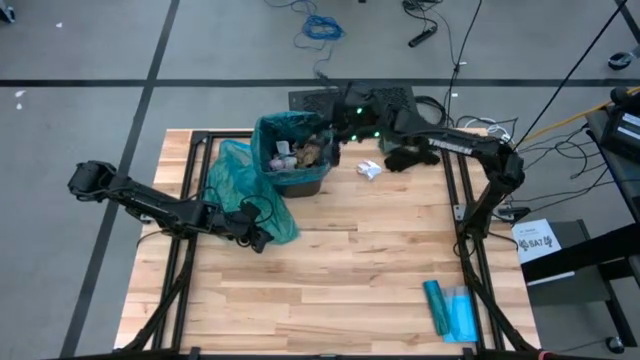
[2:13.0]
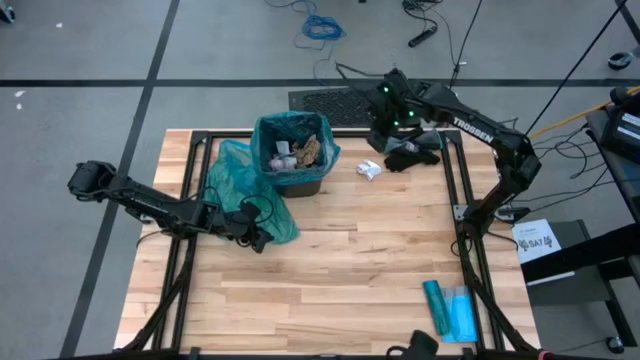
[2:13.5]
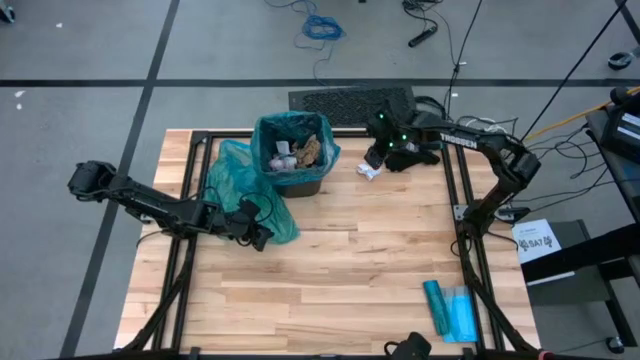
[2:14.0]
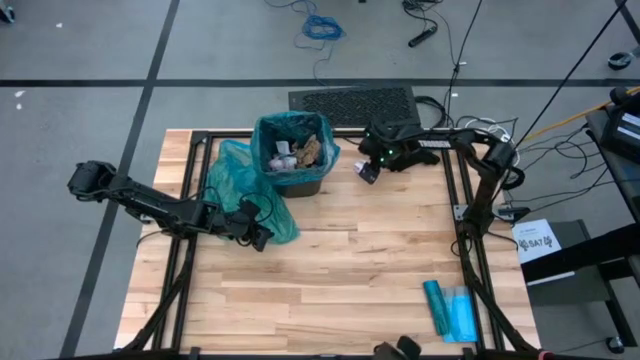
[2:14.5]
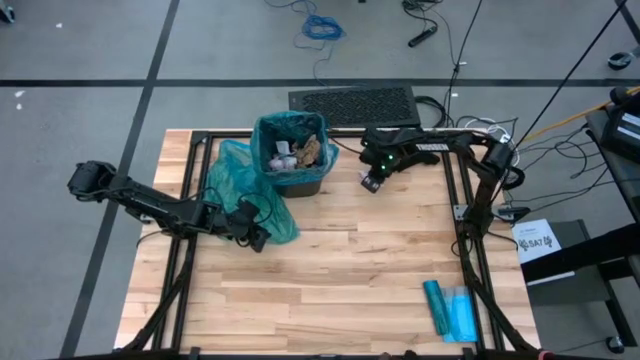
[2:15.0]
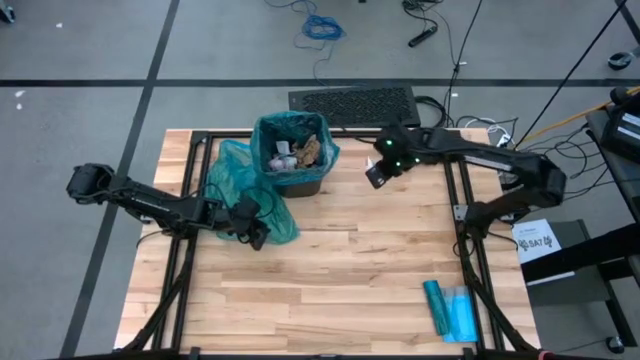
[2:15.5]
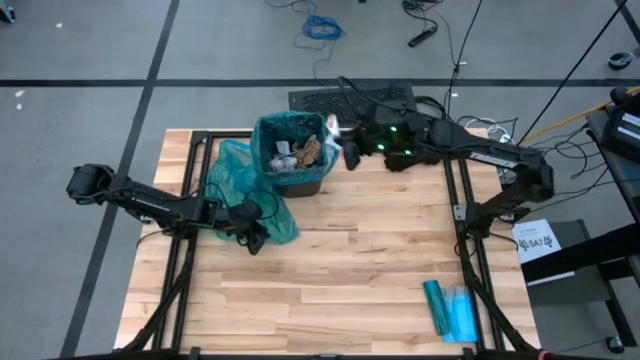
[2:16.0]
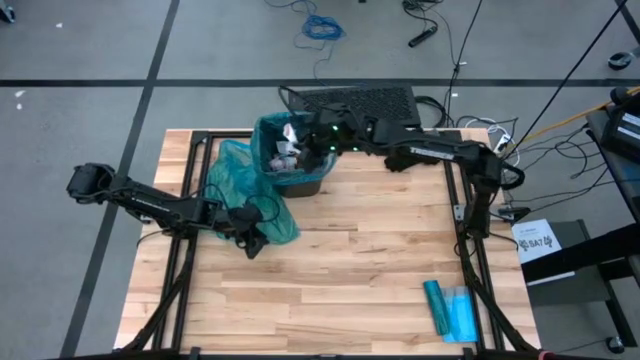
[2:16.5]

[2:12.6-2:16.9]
Task: place trash/remove bag and relplace
Put the white paper into the trash bin

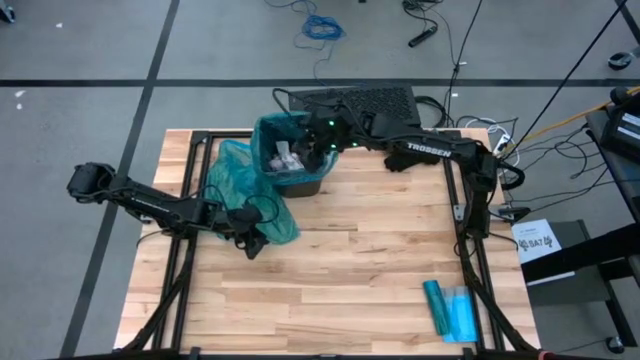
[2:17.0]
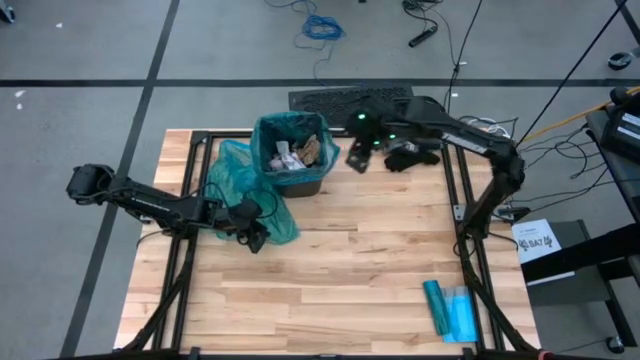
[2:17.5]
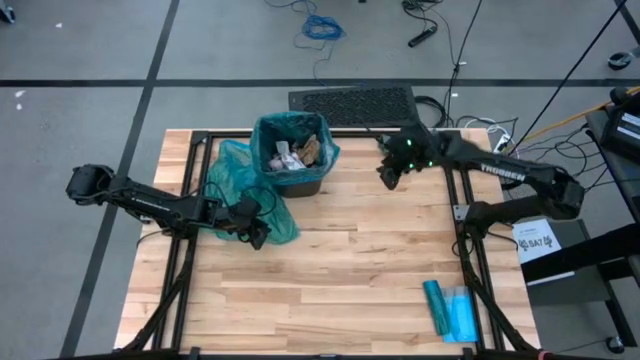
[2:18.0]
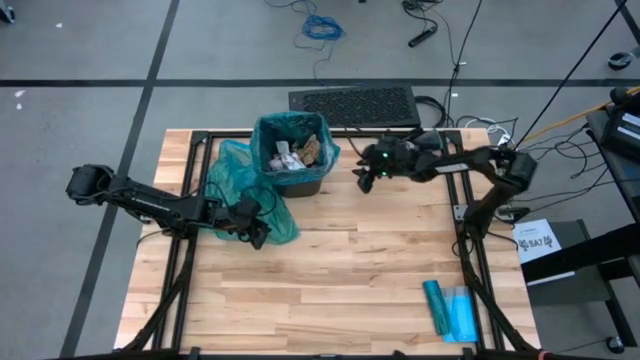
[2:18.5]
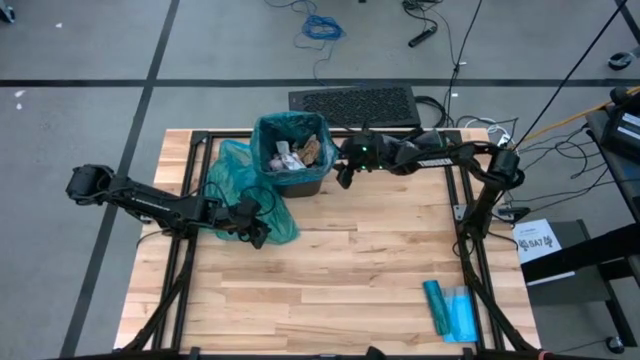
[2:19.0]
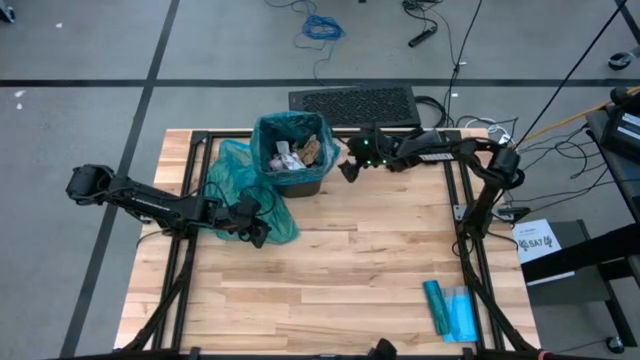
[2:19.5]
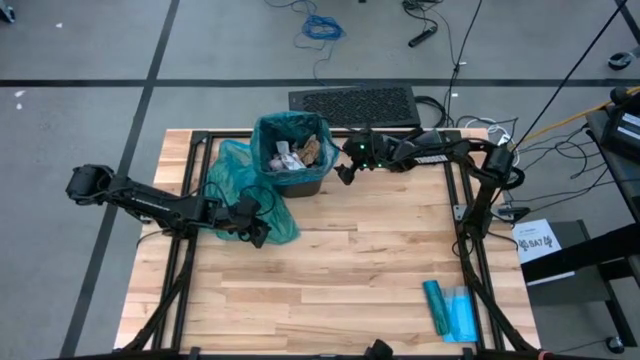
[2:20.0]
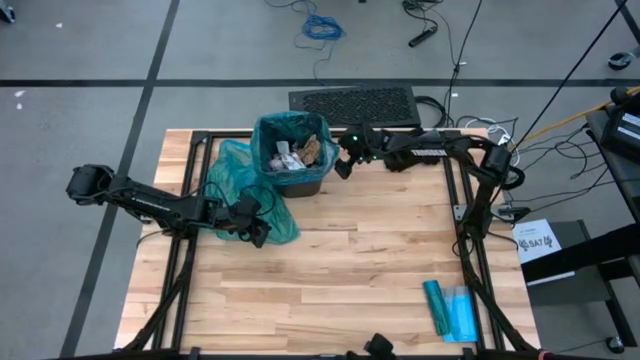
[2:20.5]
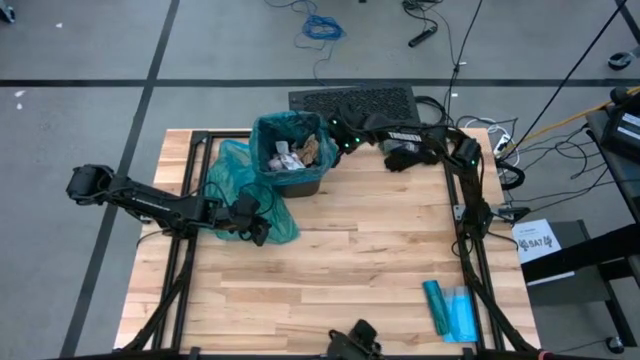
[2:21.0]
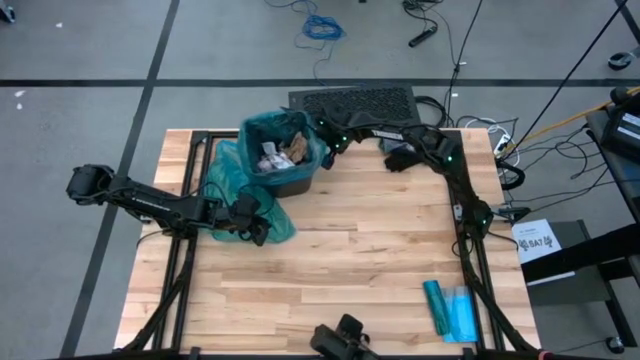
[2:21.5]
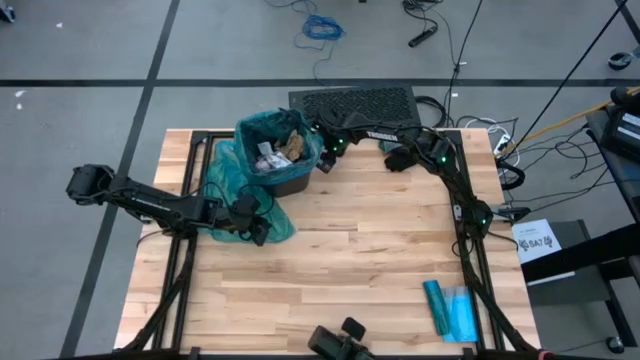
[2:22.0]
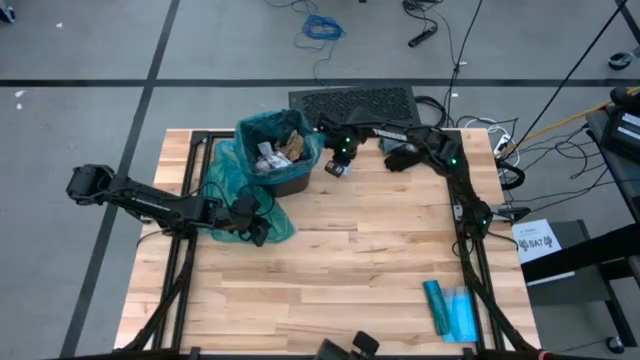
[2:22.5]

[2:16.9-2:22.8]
Put the white paper into the trash bin

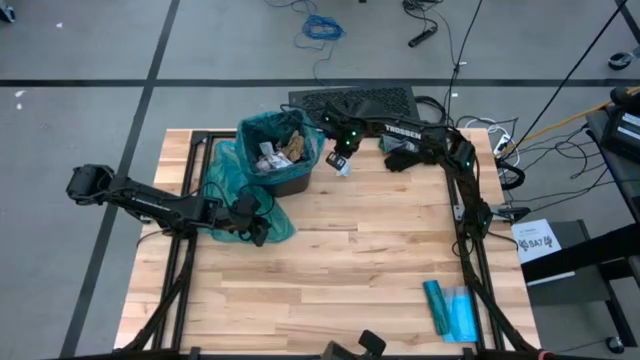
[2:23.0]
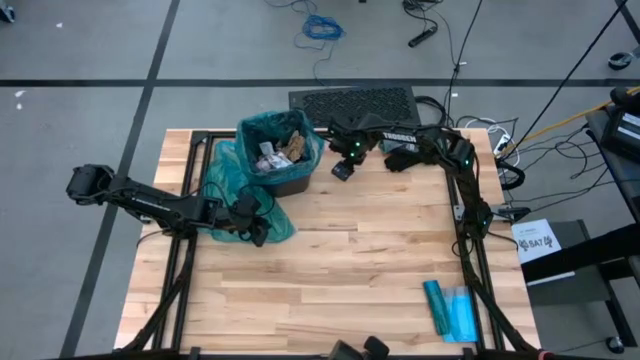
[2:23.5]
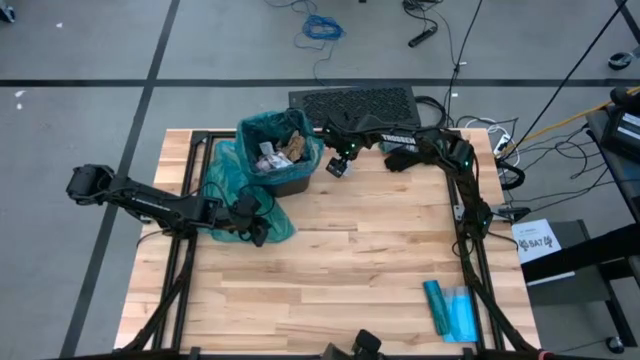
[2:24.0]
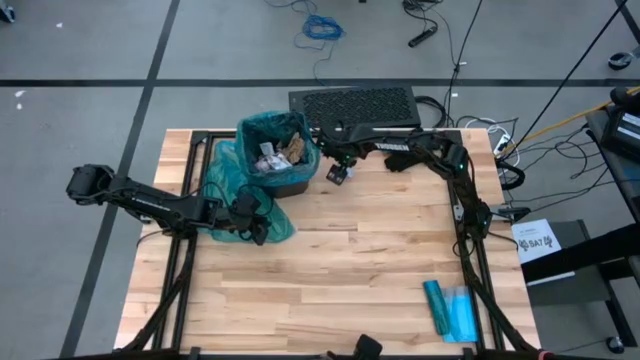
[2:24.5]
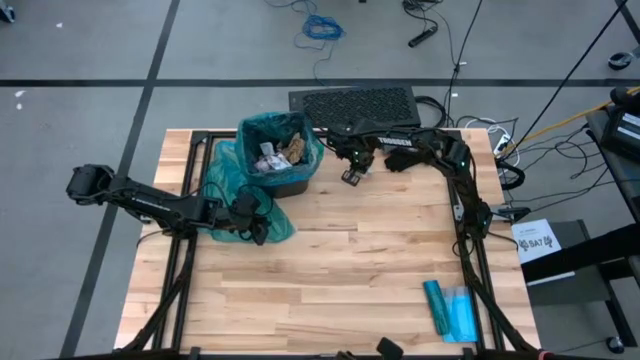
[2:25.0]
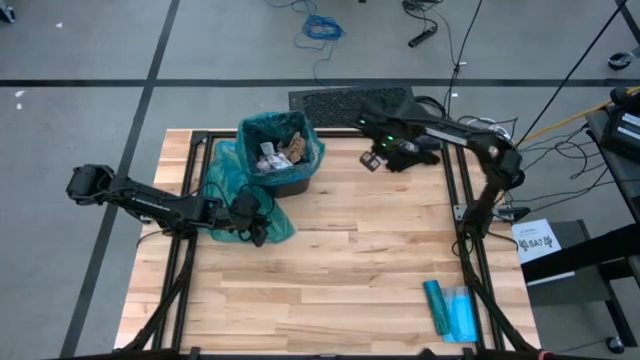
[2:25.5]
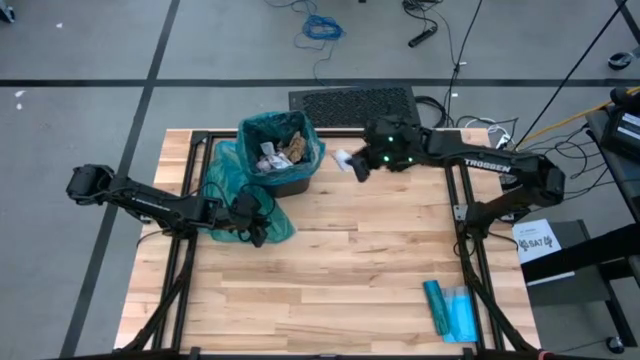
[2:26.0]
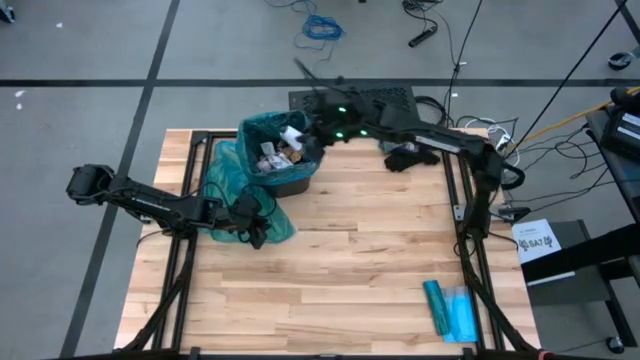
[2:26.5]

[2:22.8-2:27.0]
Put the white paper into the trash bin

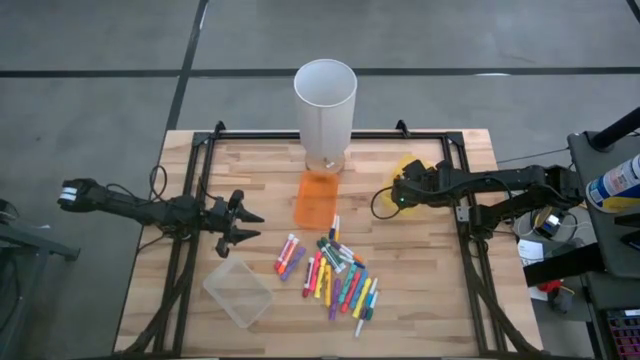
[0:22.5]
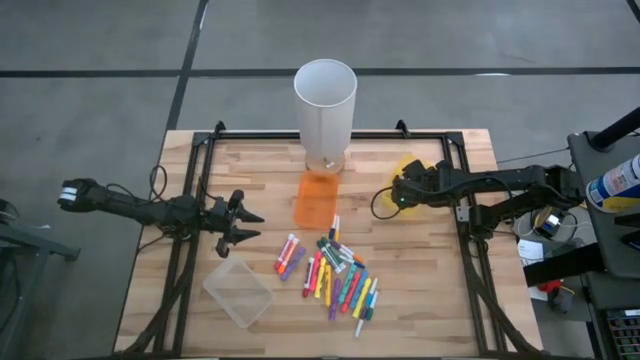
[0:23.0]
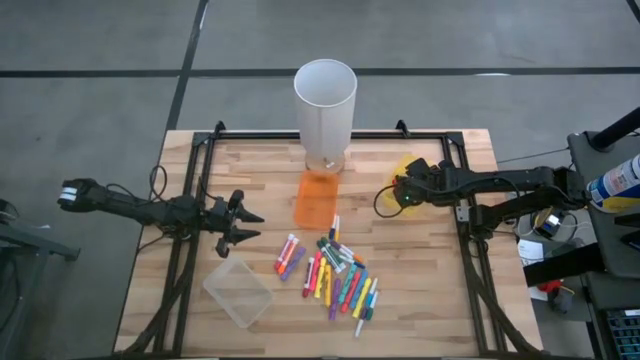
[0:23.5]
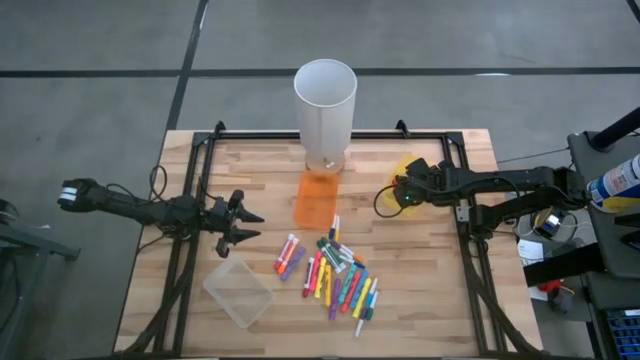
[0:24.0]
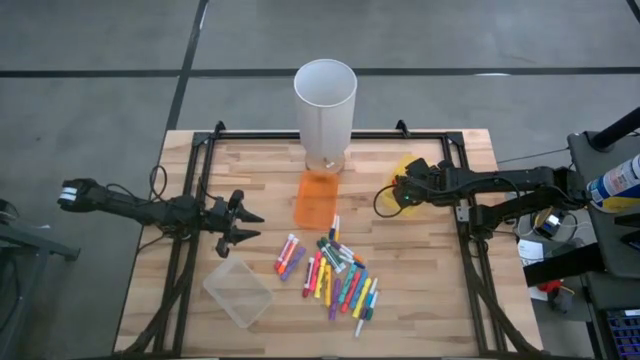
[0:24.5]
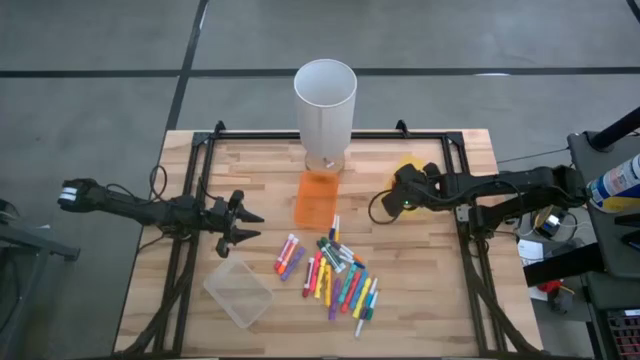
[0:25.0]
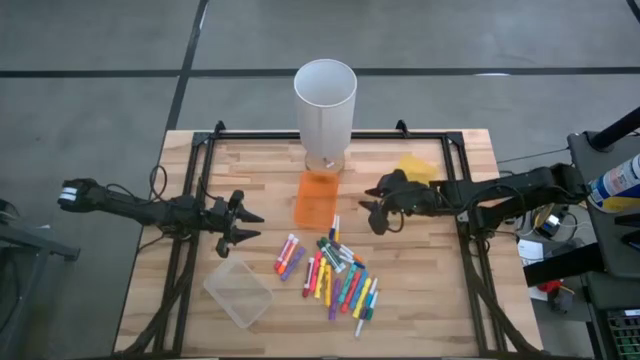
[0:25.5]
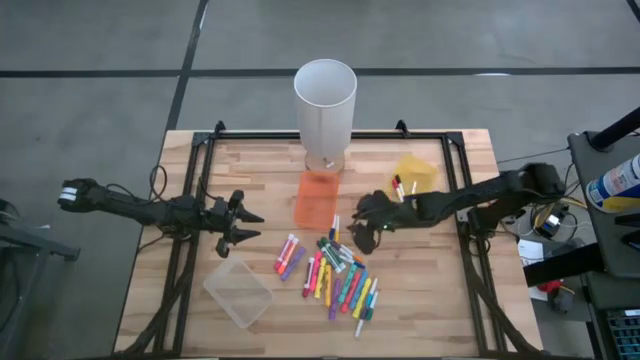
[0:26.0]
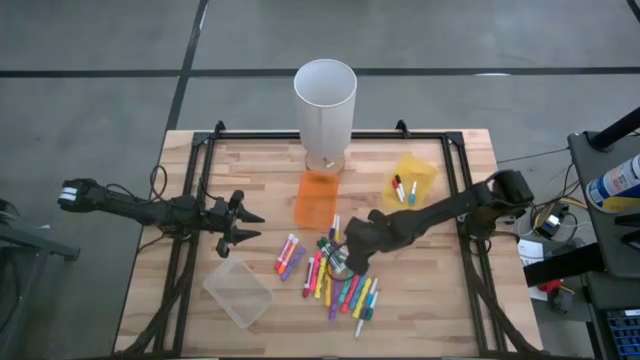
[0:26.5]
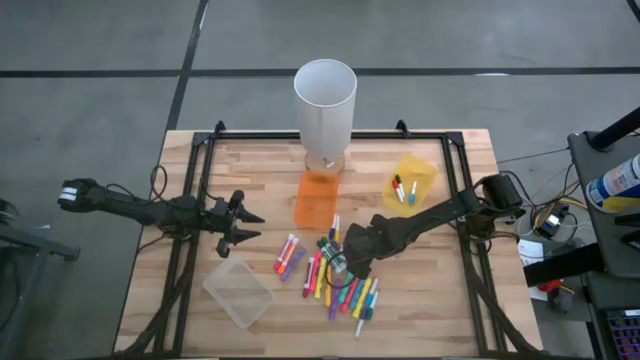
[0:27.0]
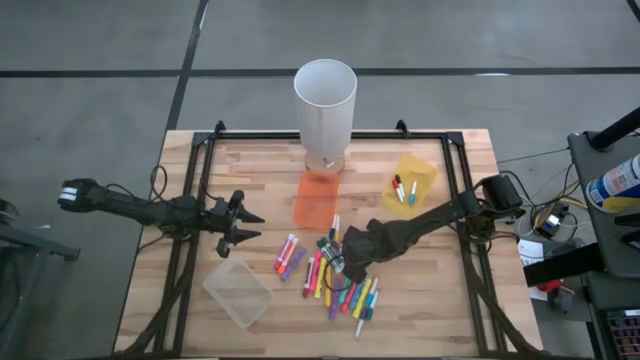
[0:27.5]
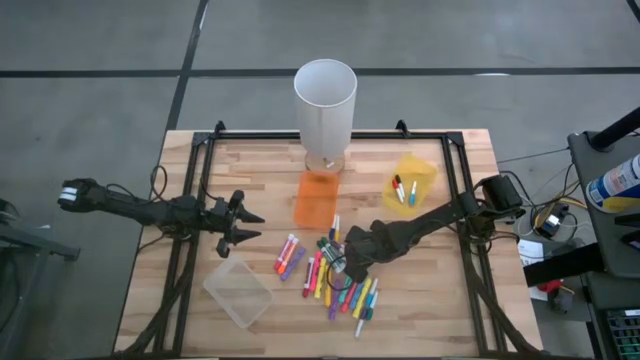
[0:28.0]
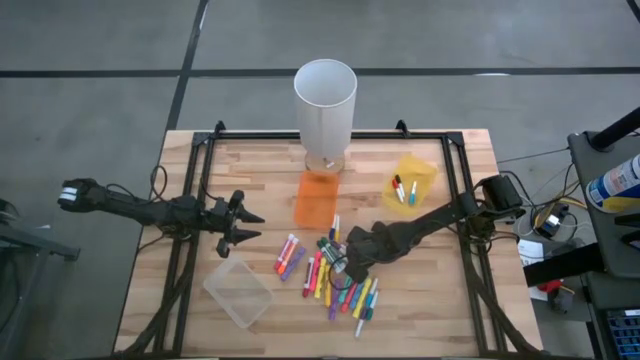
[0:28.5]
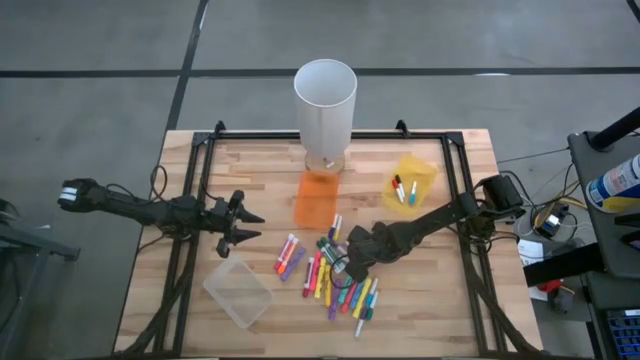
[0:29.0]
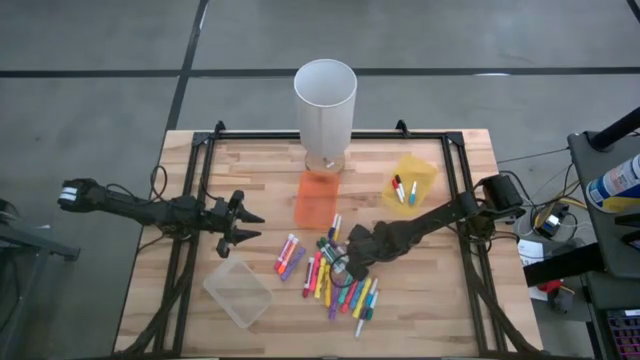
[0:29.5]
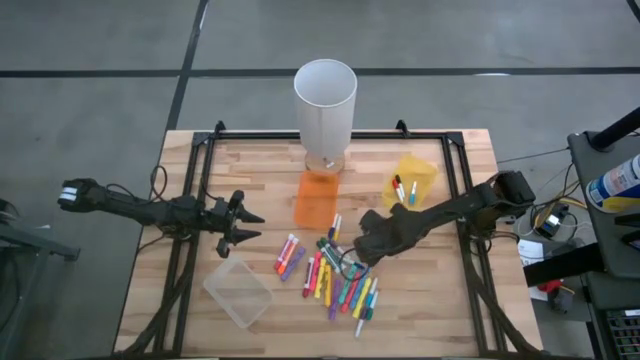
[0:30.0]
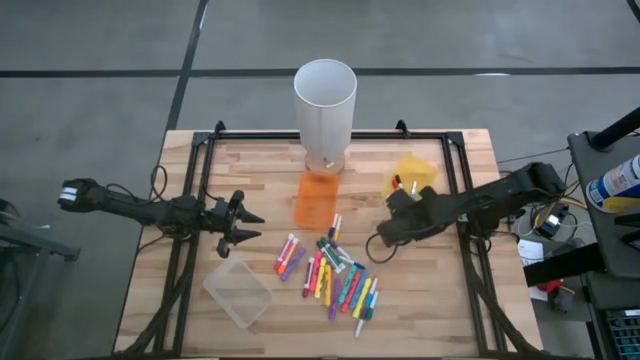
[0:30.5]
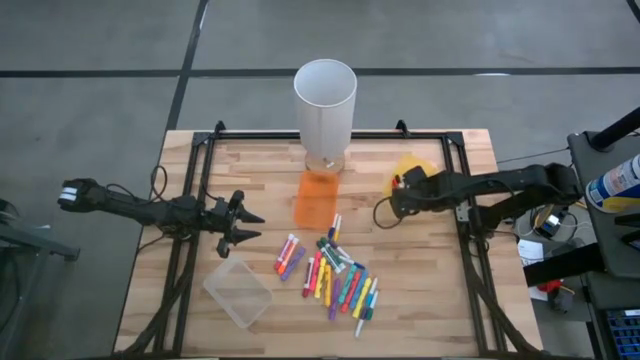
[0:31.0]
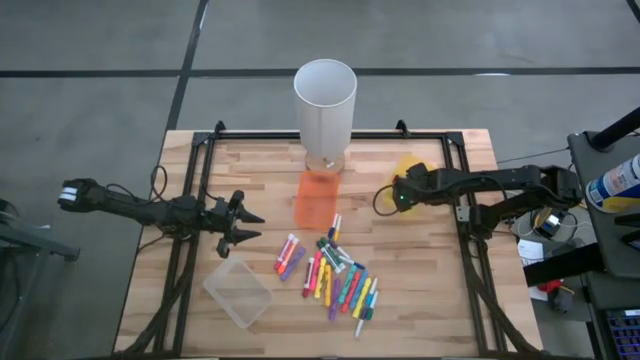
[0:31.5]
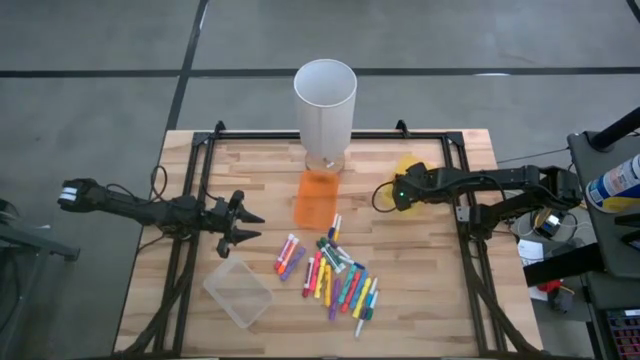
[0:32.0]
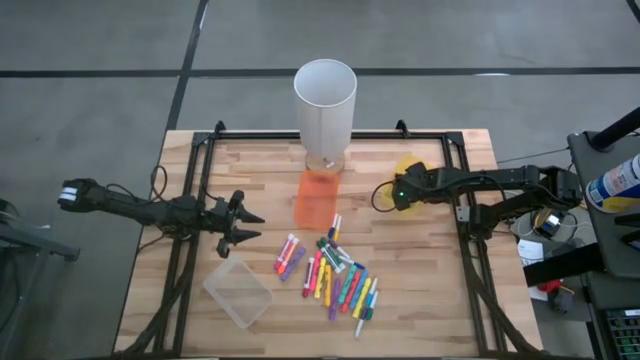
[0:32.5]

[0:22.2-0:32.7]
Task: Pick & Place Markers
Put the small orange marker pen into the yellow bin
